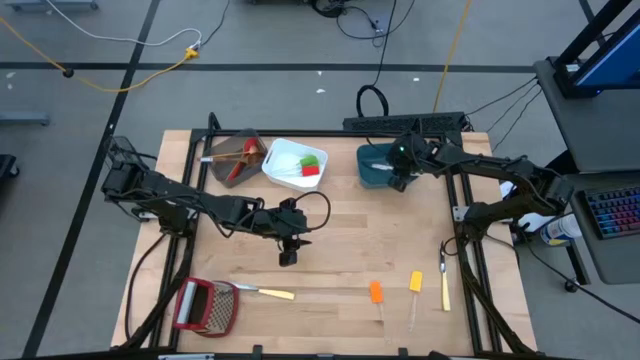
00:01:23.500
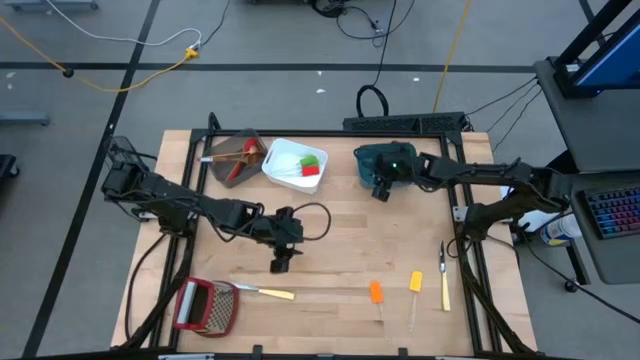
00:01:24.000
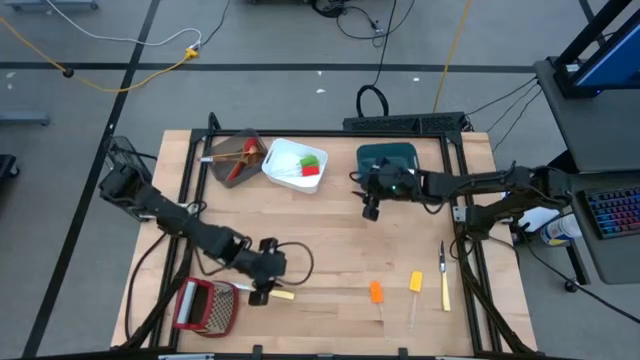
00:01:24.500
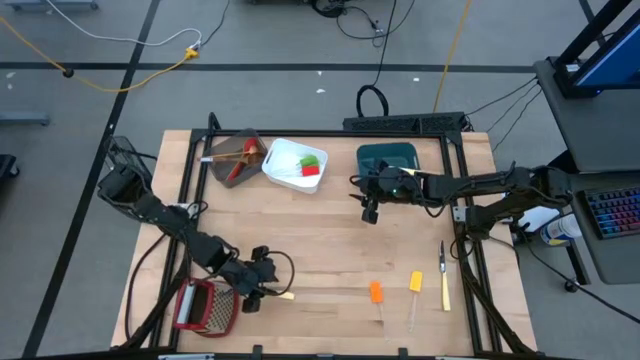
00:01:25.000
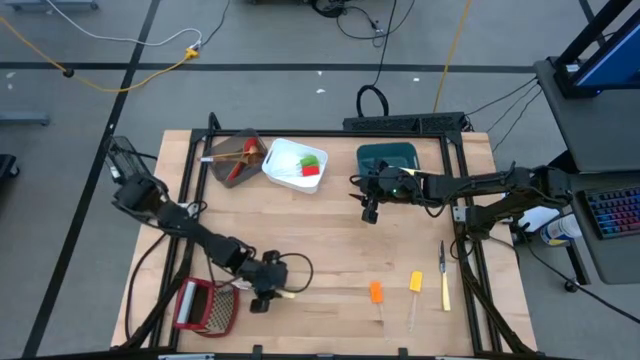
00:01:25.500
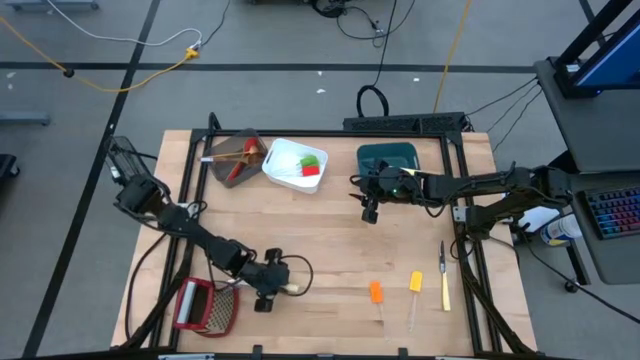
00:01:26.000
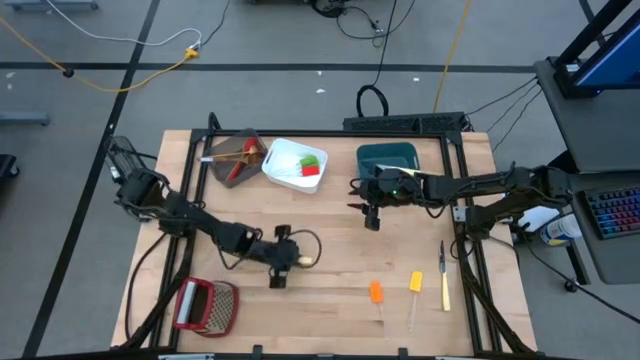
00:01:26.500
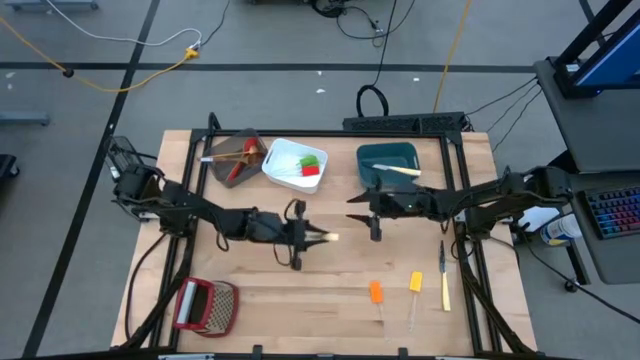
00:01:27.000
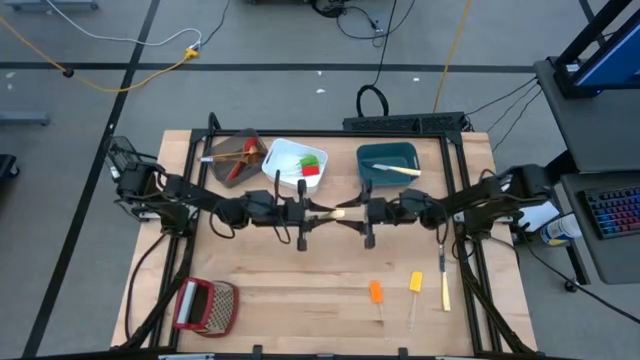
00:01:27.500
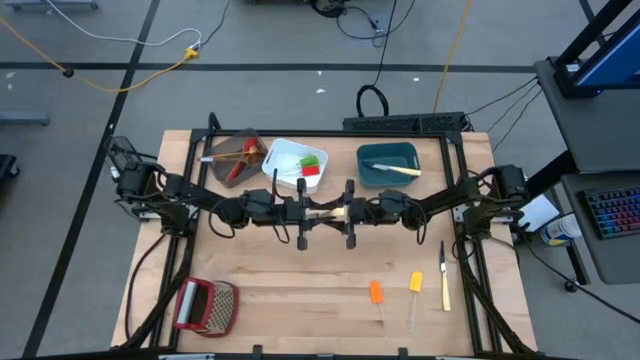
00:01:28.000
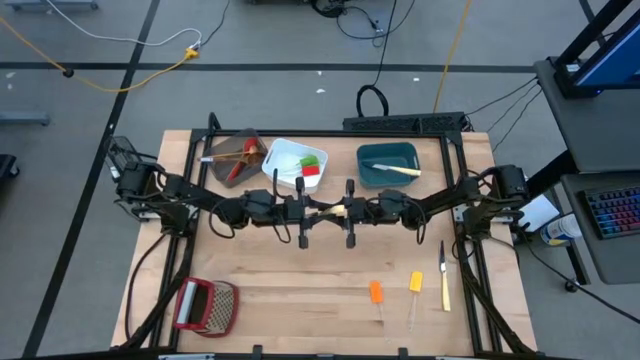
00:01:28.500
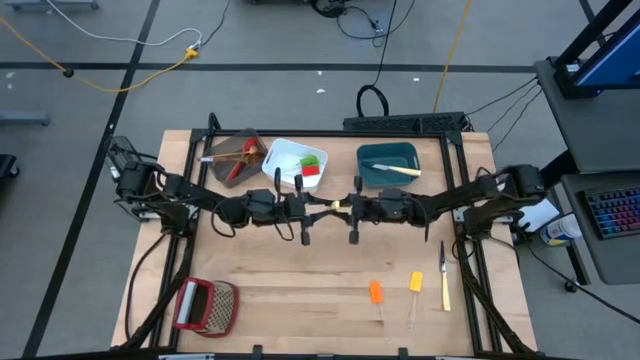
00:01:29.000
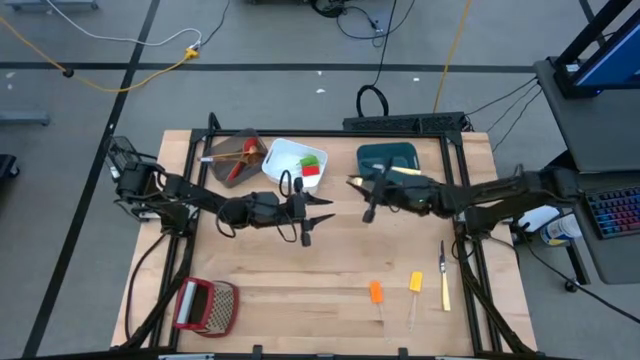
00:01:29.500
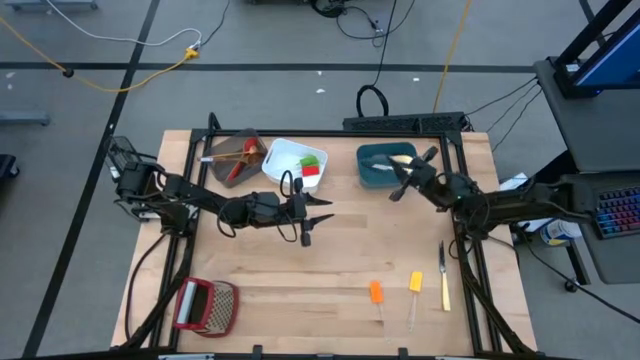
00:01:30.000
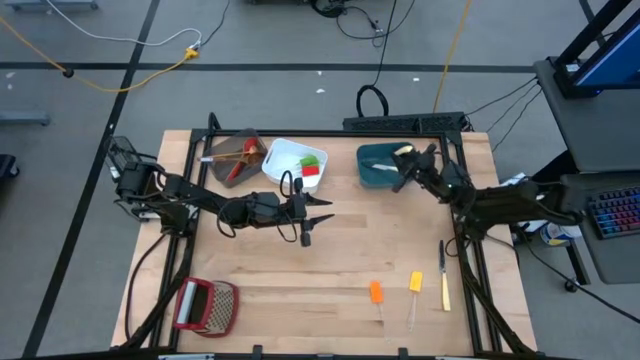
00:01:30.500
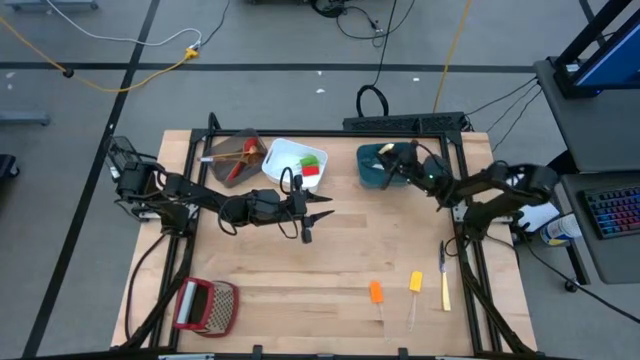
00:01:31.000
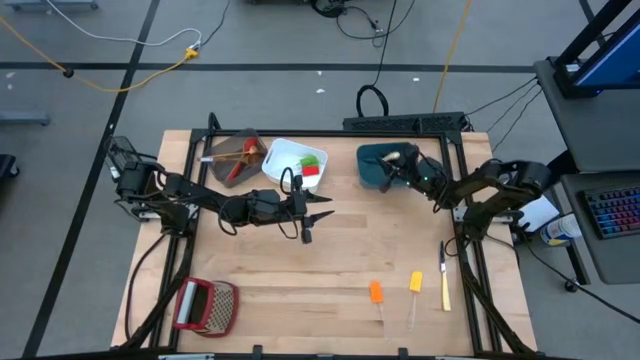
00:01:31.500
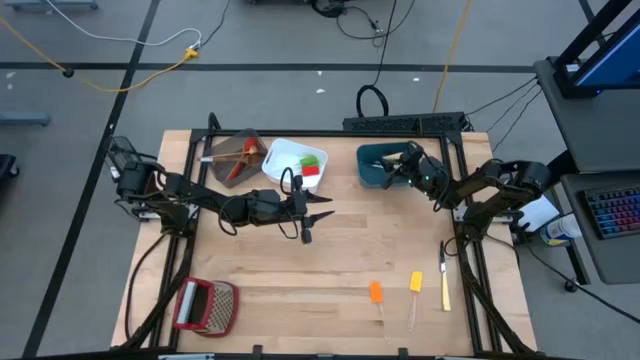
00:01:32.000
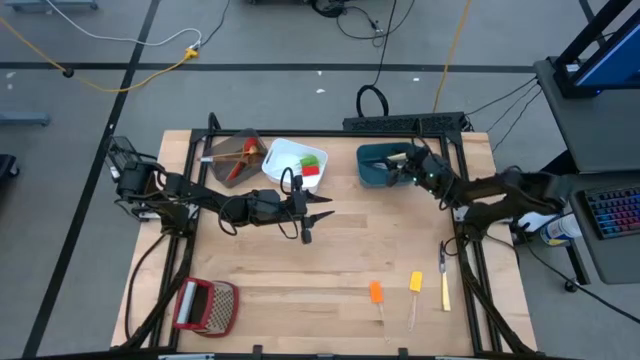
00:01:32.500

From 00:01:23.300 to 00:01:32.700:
Task: Pick & Place Kitchen Items
Put the left yellow knife into the blue bin

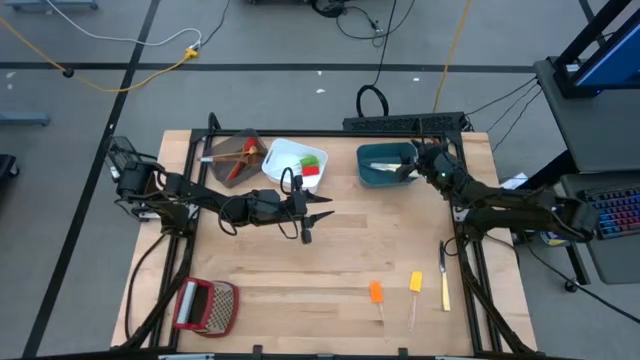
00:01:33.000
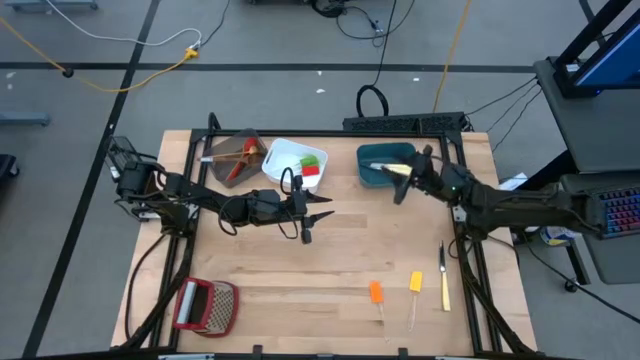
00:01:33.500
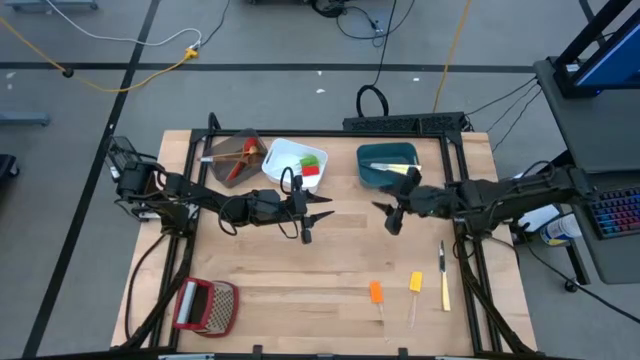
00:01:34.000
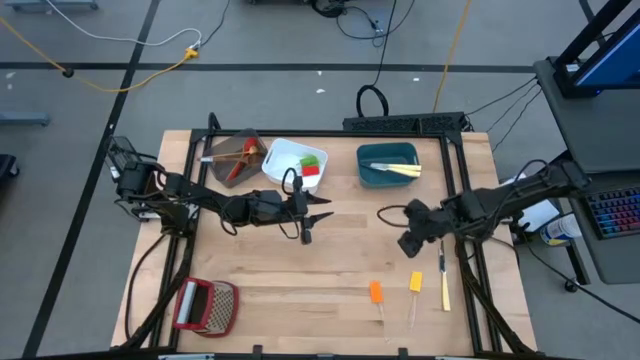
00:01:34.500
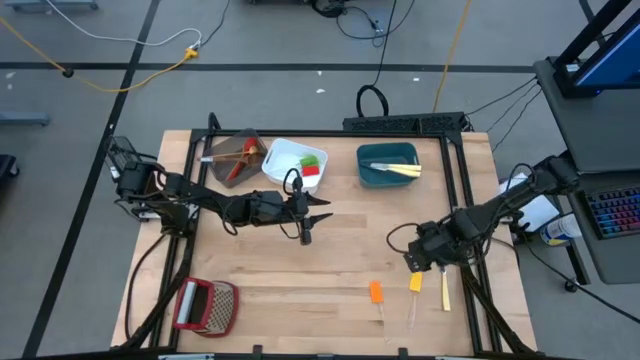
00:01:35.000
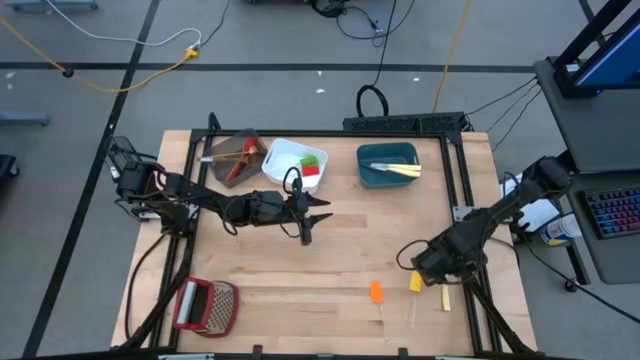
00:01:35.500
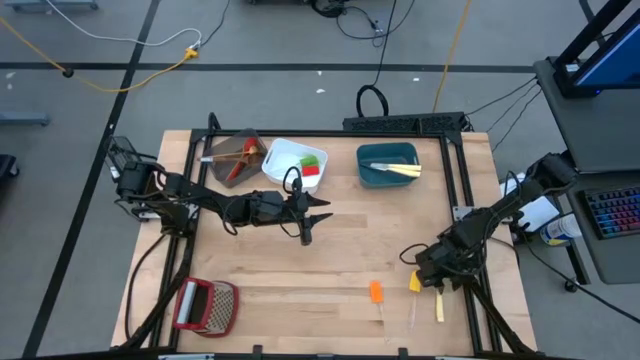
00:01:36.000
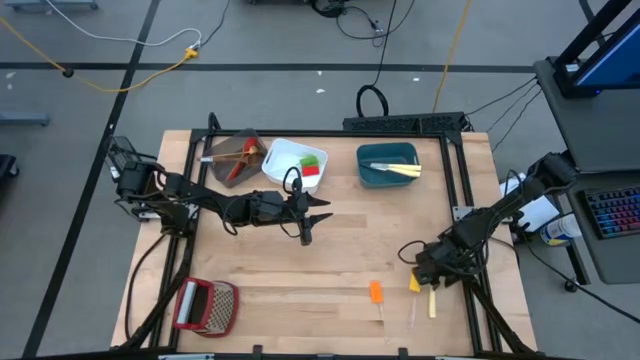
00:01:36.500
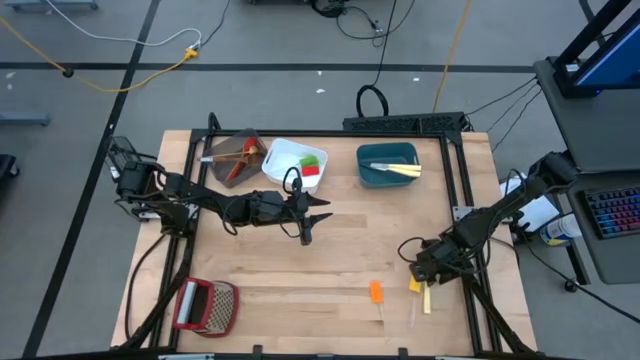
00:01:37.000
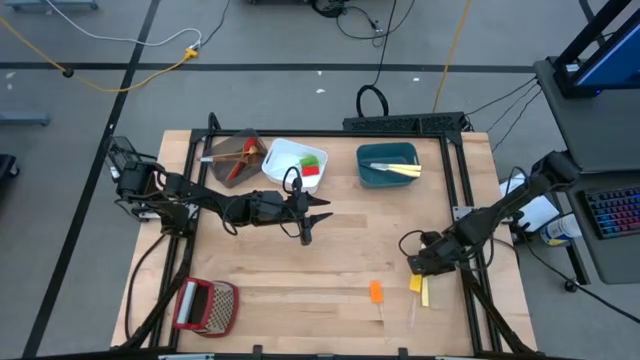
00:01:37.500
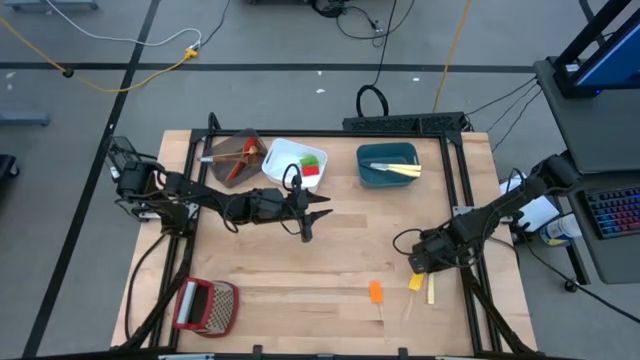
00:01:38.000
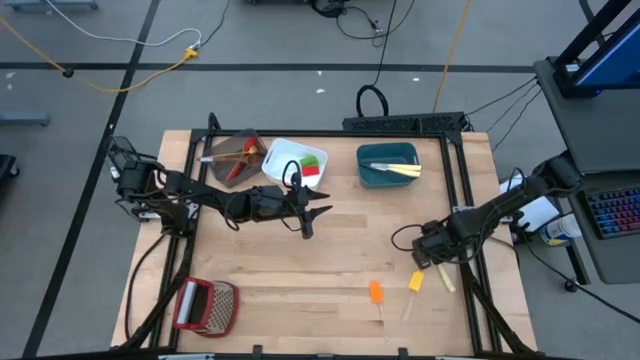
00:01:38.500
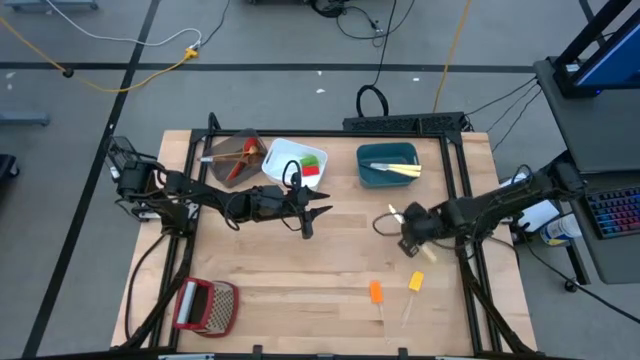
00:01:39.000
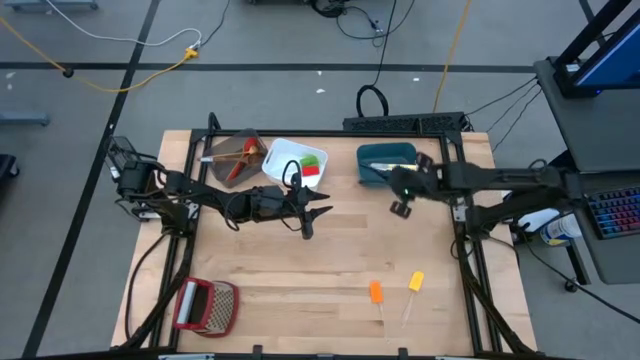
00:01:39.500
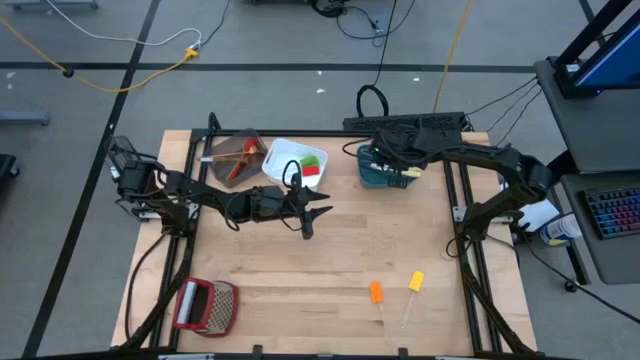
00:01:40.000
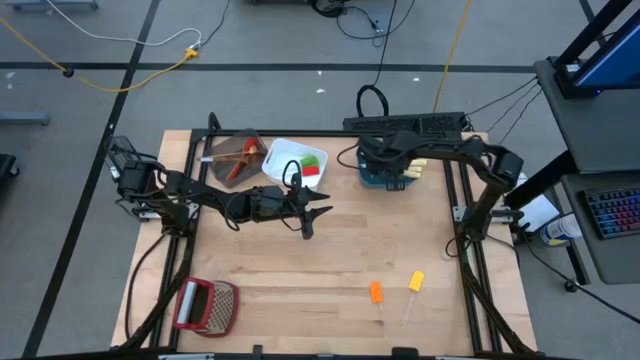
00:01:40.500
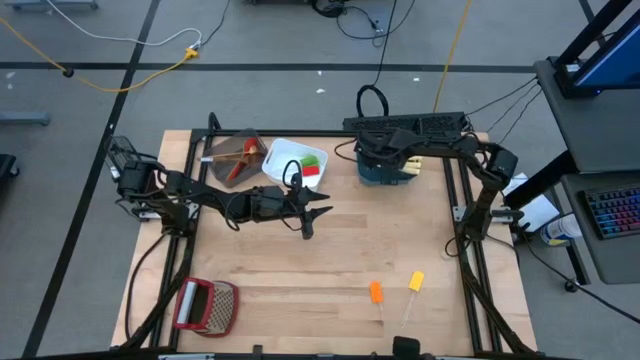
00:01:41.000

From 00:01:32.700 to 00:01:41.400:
Put the yellow knife into the blue bin

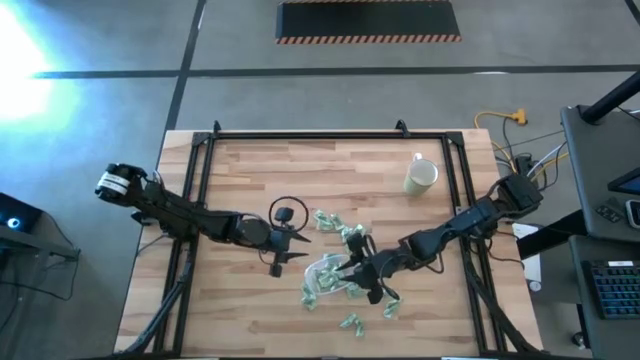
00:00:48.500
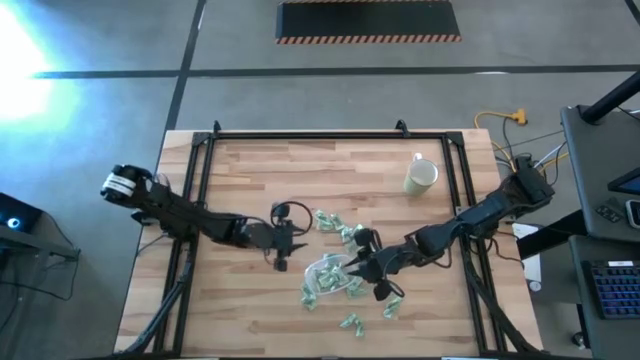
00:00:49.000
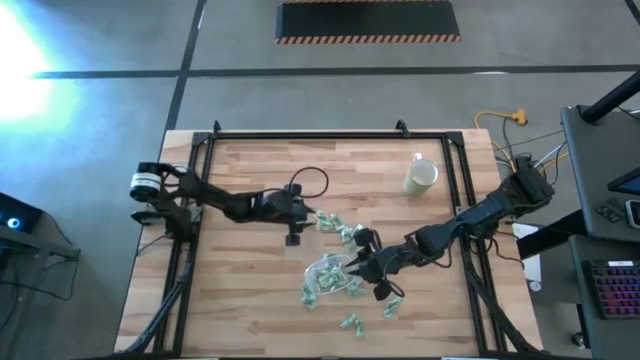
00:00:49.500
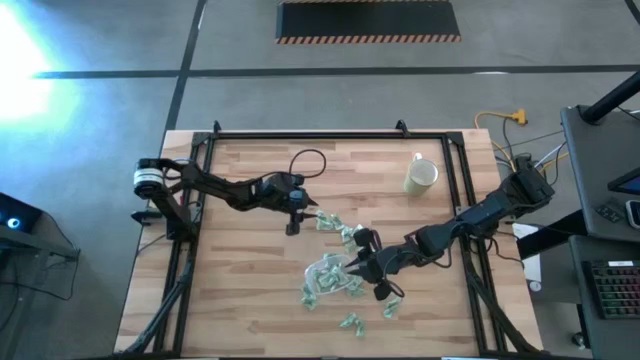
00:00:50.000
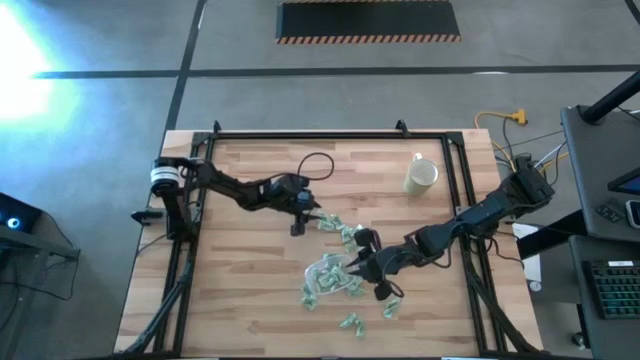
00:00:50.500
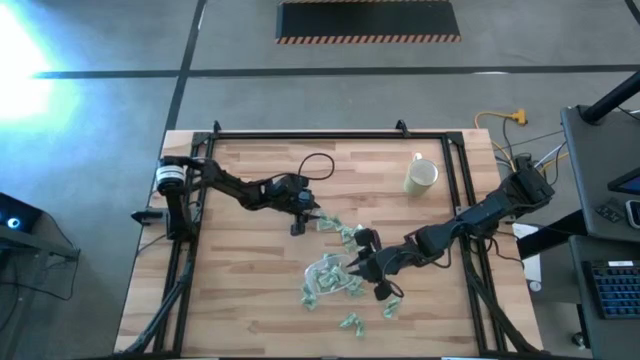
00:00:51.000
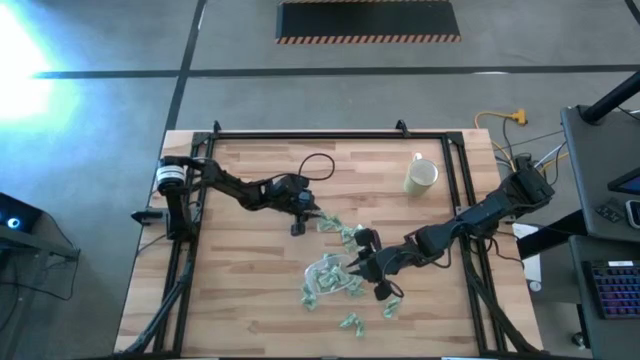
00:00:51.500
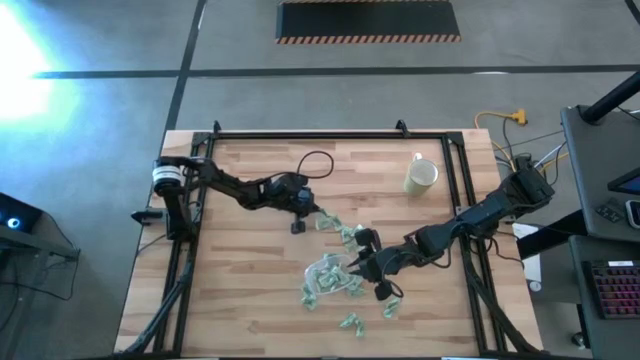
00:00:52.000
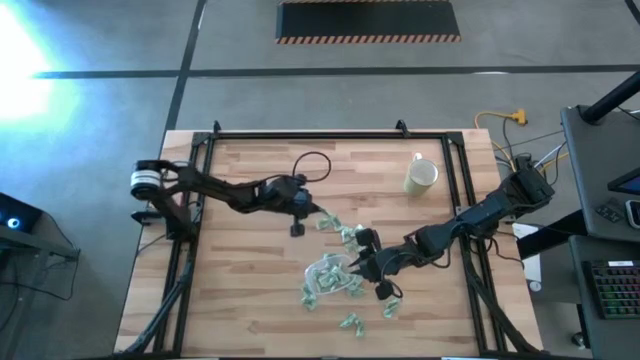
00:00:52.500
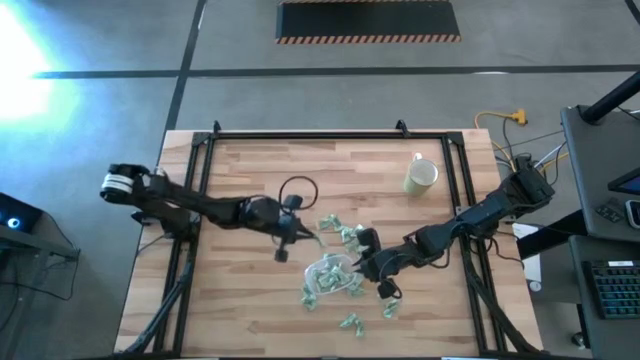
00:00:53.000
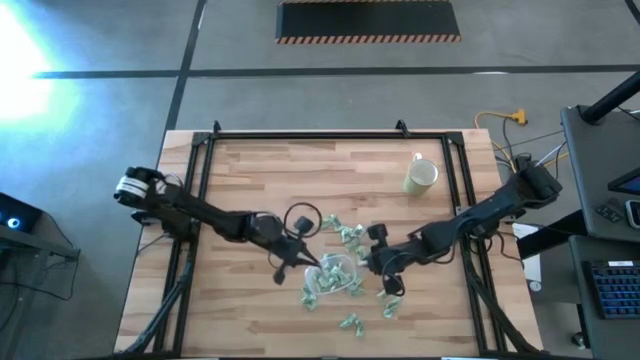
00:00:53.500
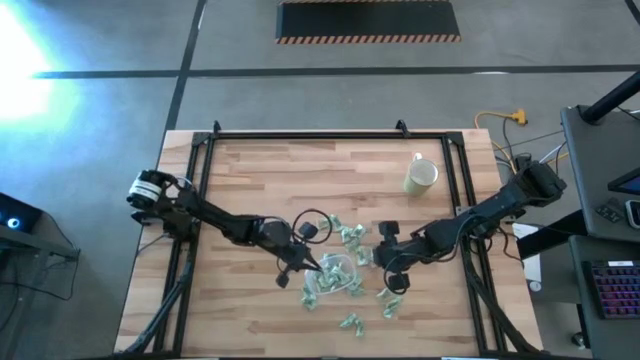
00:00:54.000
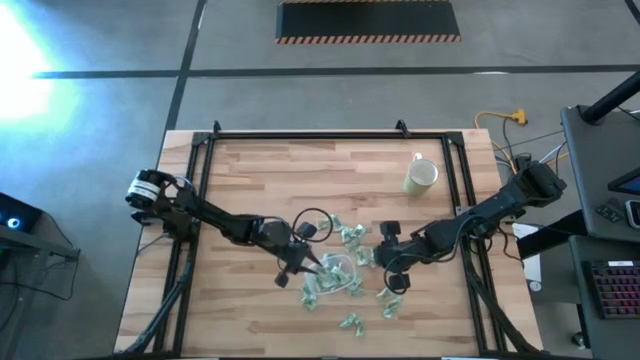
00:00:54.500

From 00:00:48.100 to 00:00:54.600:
Task: Pick and place items into bin
Put the Stevia packet into the transparent bin
